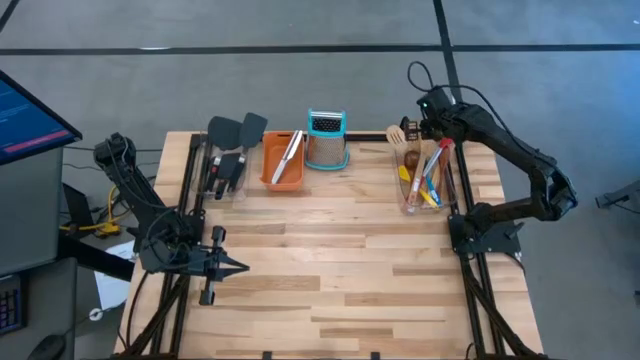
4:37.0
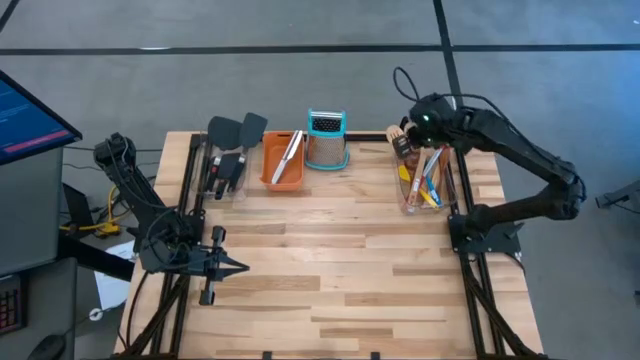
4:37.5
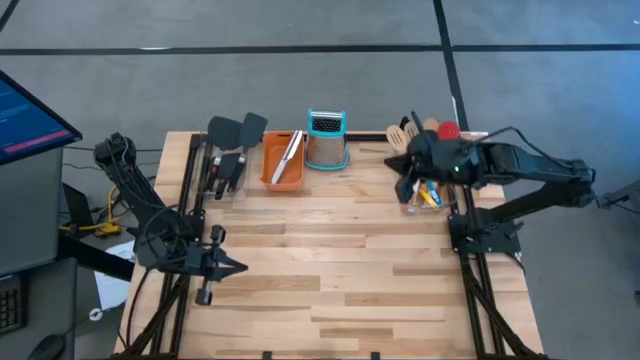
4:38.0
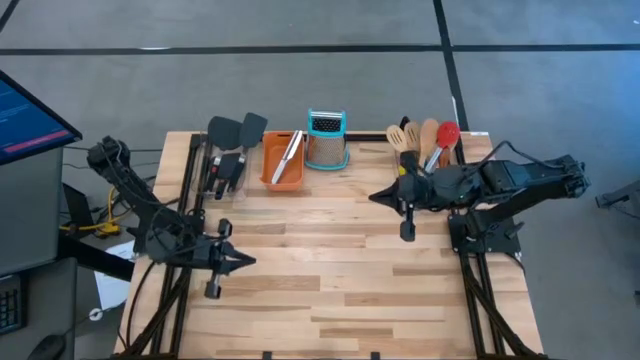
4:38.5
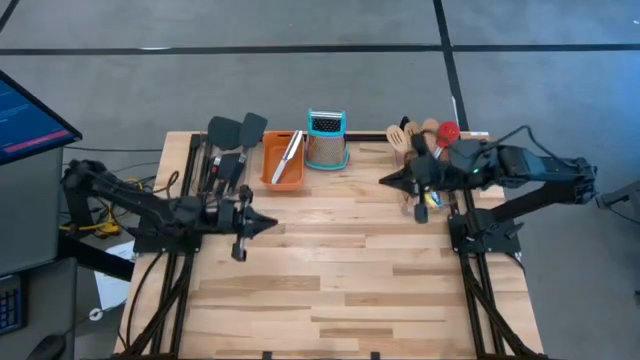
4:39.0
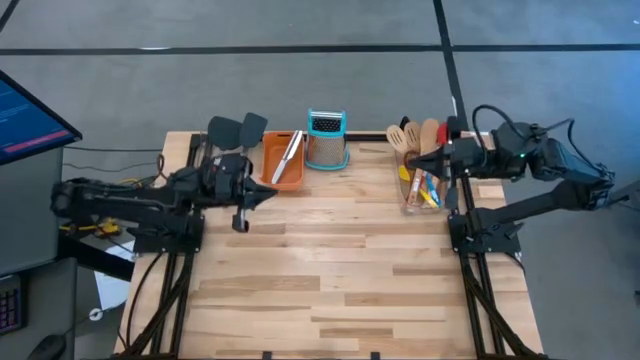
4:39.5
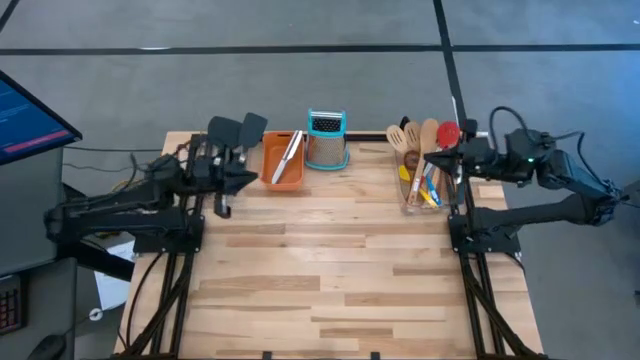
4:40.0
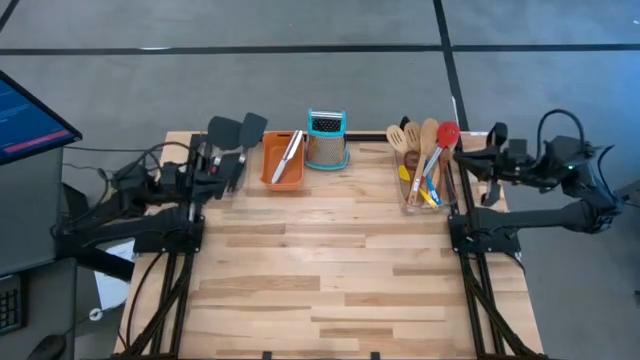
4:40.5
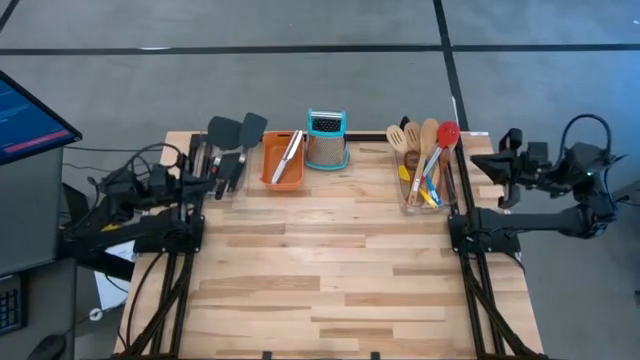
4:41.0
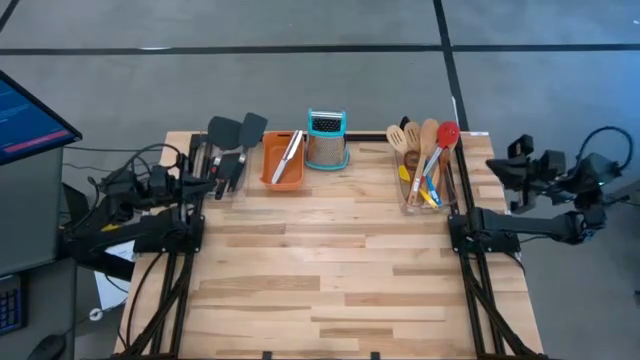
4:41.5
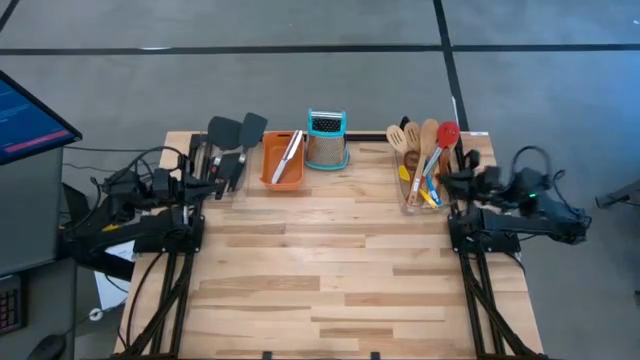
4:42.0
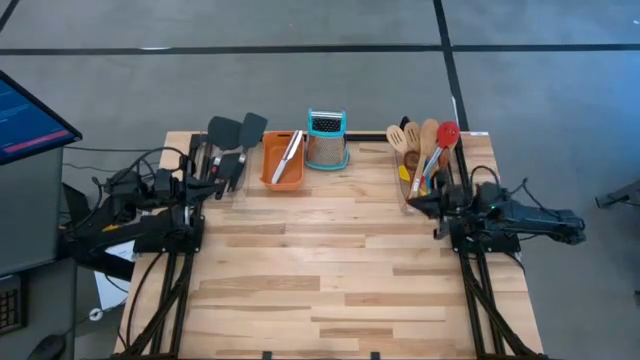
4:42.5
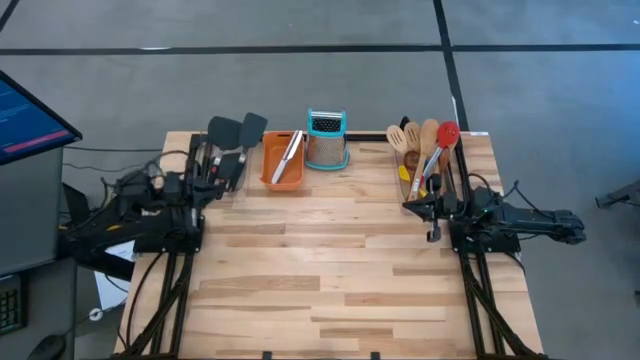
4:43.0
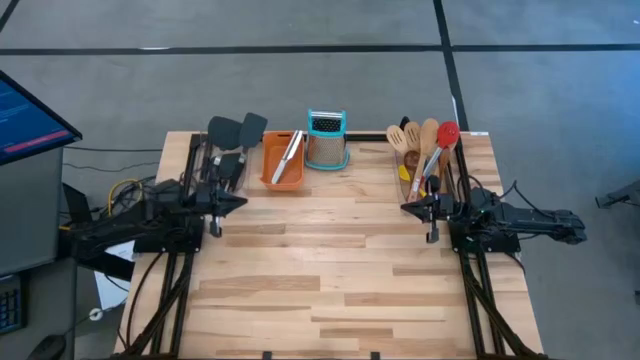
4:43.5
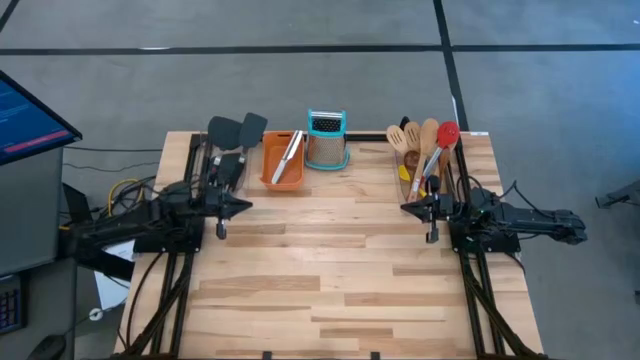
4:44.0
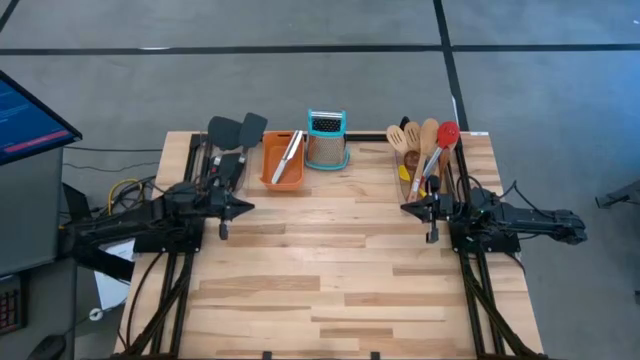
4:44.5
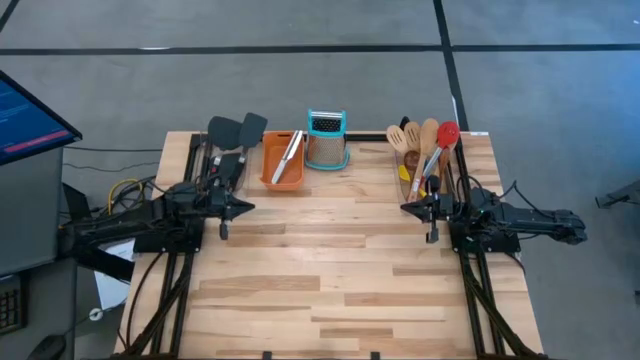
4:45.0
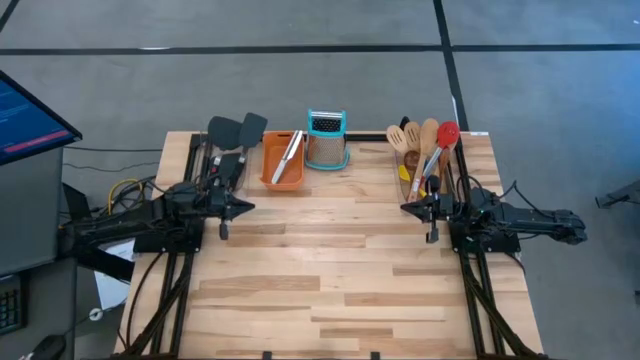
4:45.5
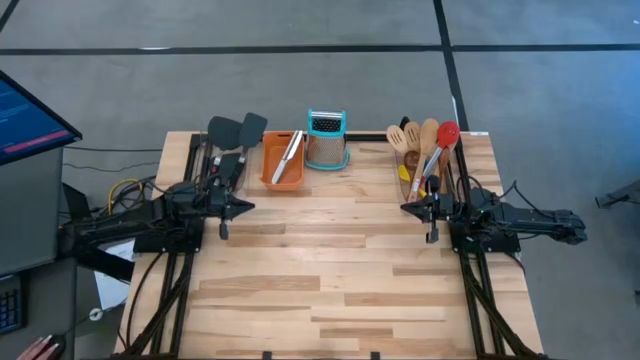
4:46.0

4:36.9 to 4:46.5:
Task: Pick & Place Kitchen Items
Return to Home Position

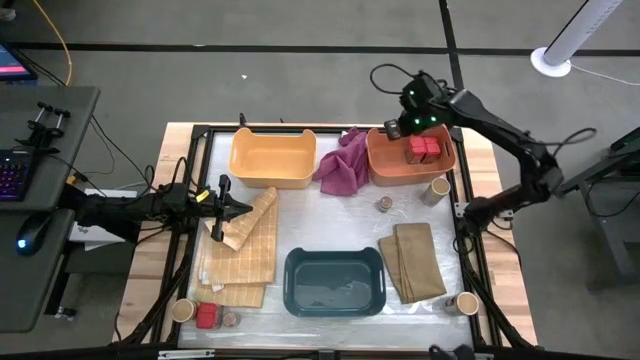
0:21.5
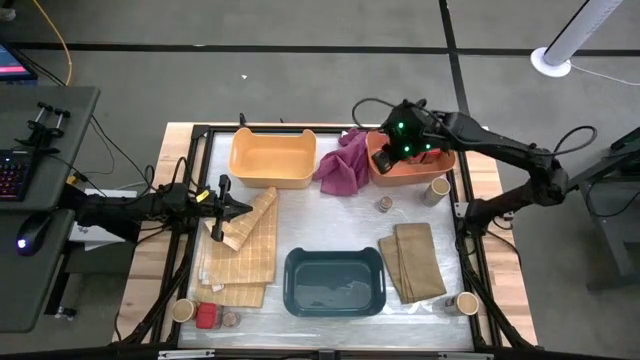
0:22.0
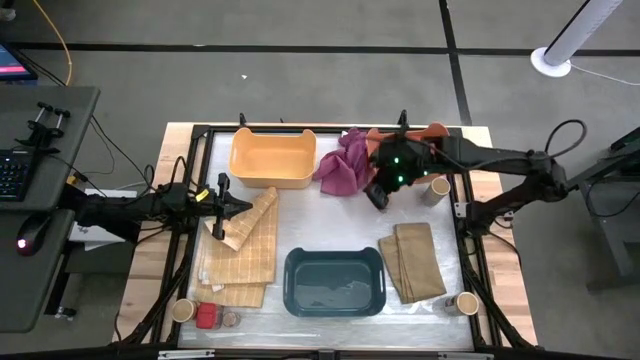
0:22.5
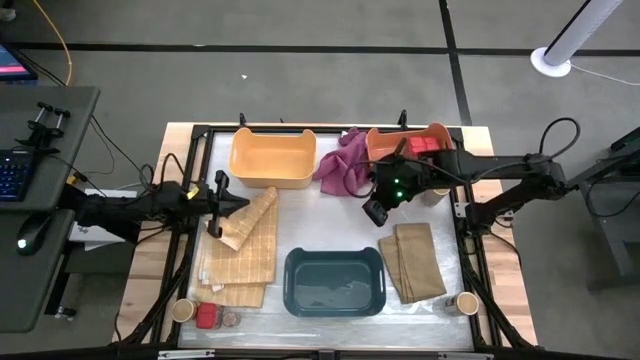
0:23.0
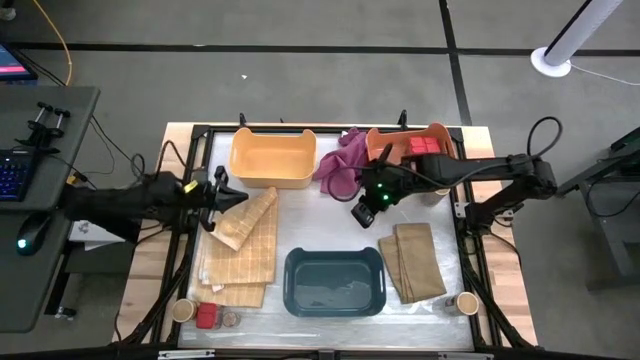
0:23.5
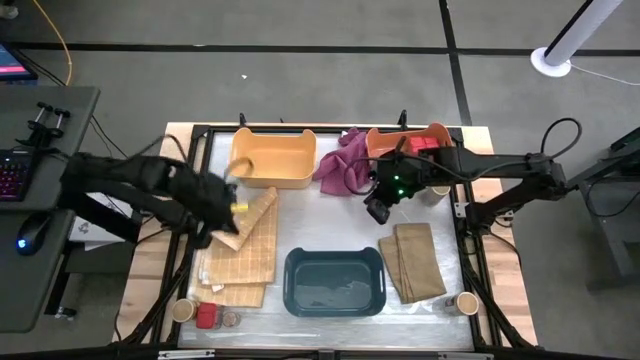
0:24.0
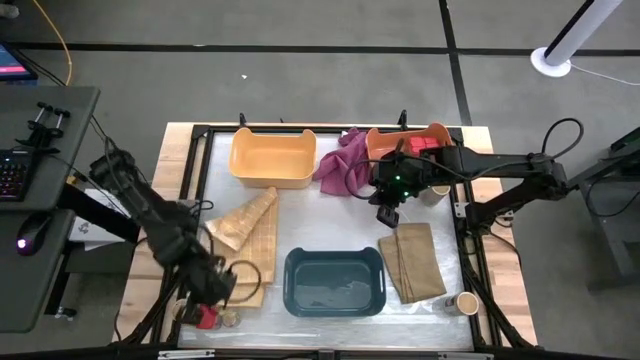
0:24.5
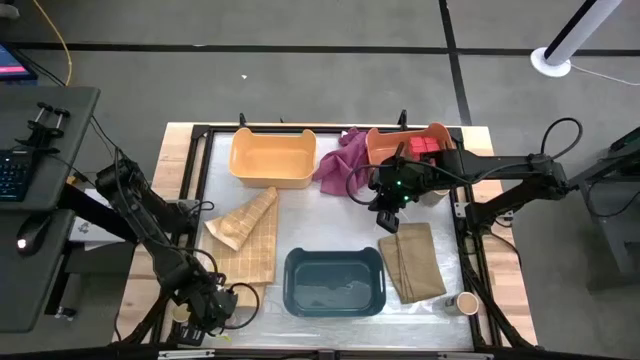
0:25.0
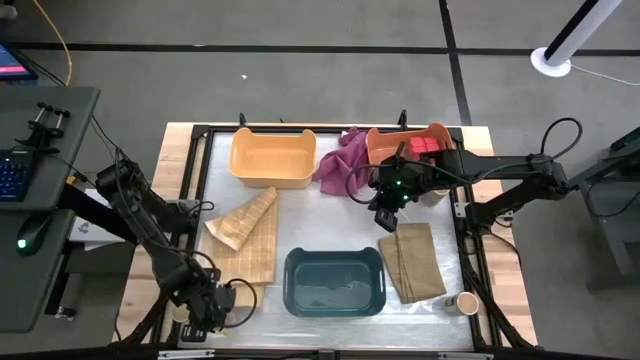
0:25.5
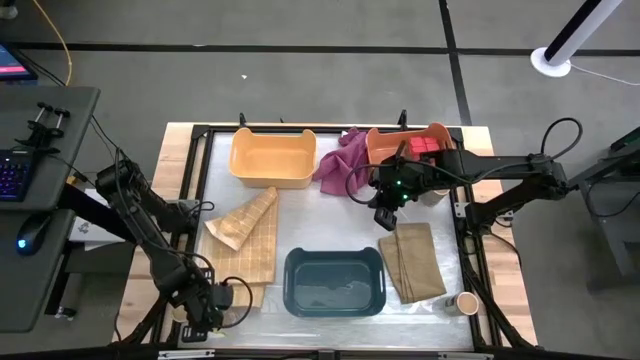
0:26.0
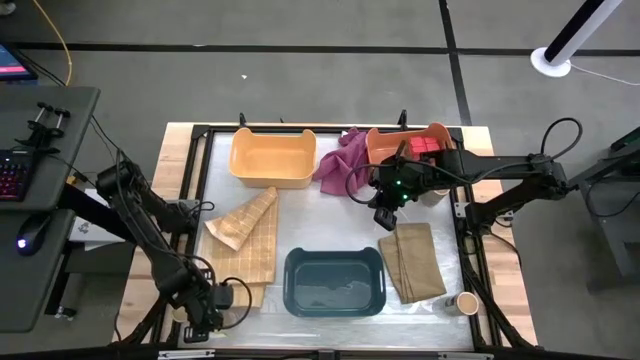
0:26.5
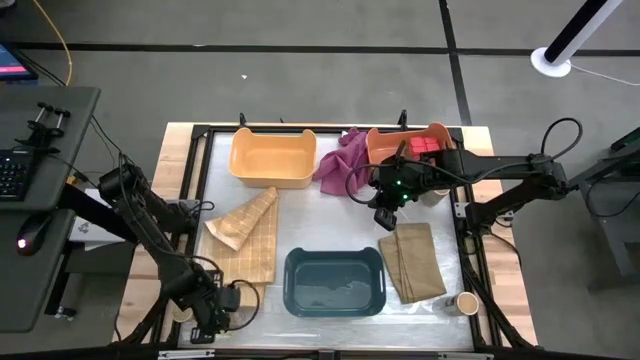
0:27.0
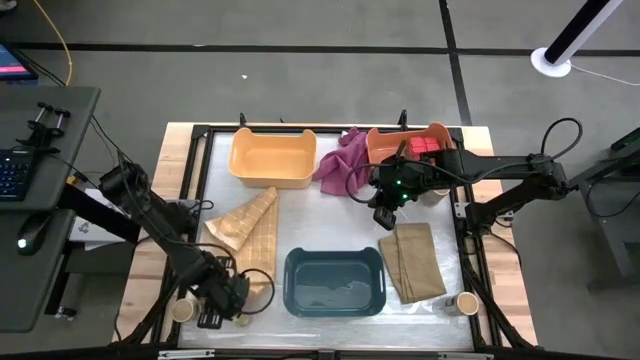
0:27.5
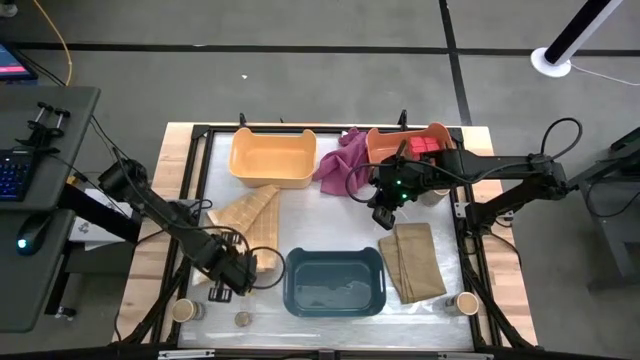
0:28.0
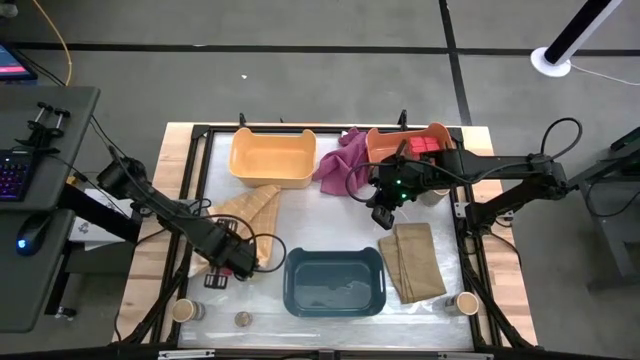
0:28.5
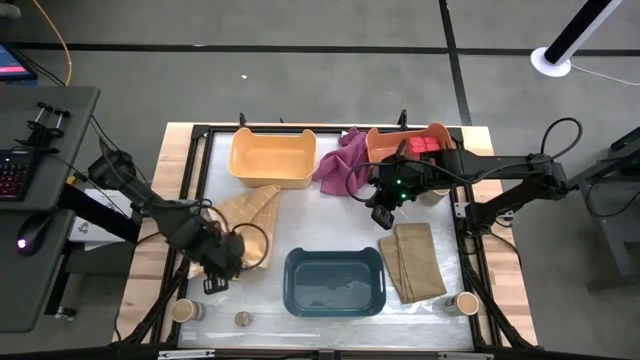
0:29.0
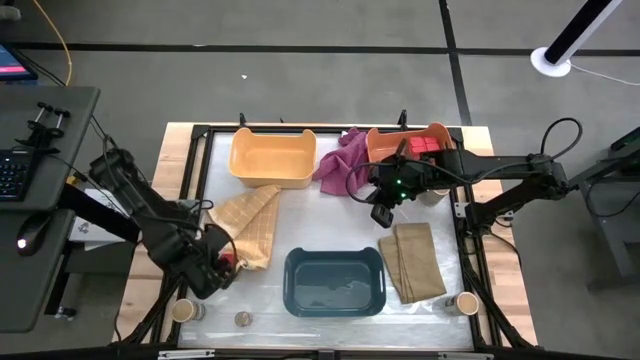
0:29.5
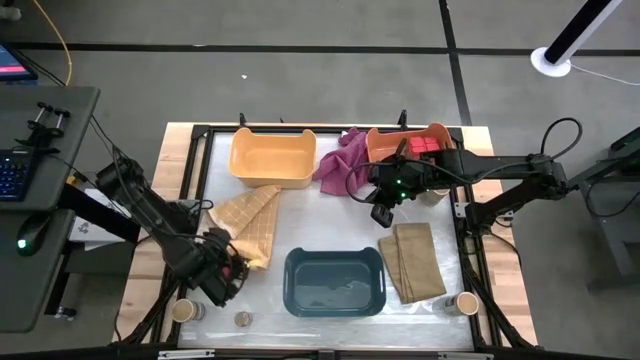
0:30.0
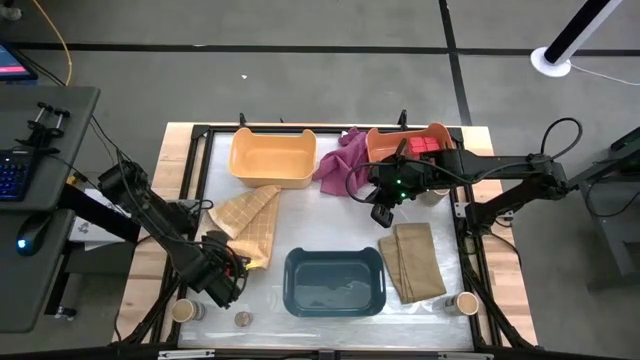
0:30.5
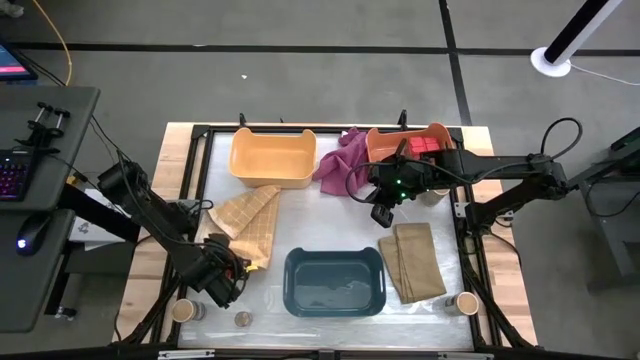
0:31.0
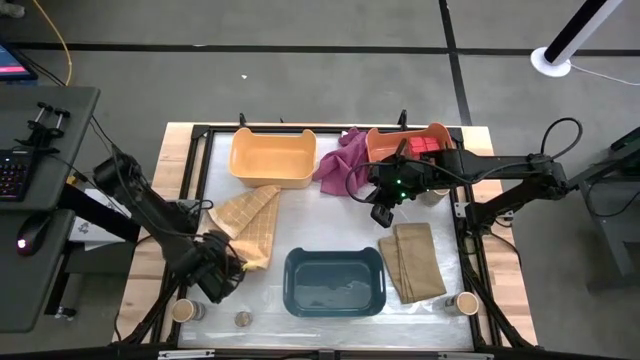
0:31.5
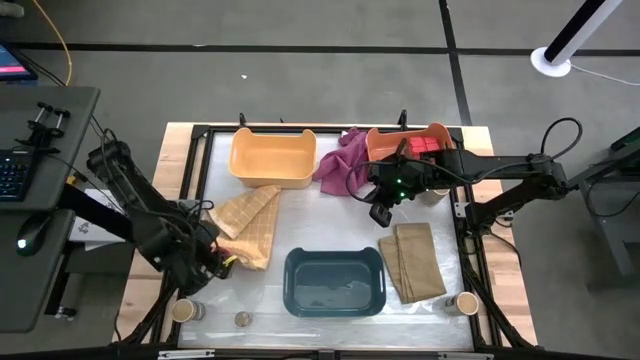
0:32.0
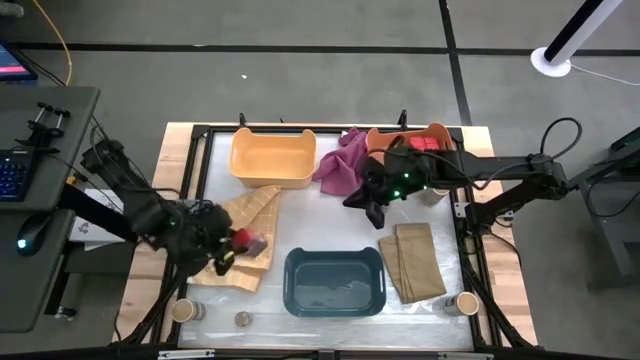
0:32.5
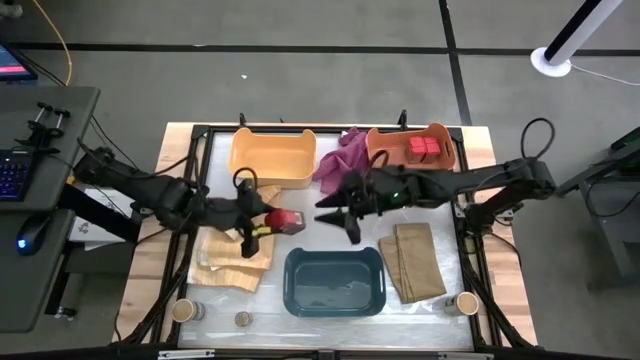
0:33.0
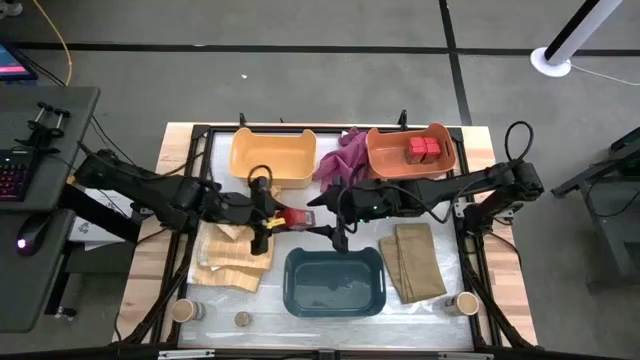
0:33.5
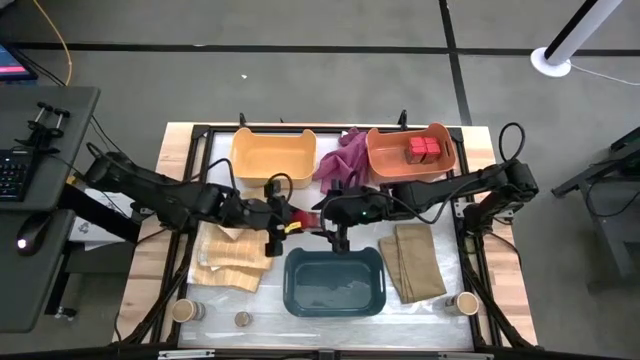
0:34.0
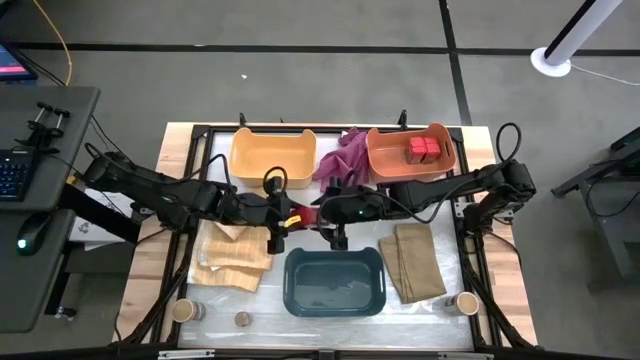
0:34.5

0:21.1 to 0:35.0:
Task: Sort spices by type
Put the red seasoning can into the orange bin
